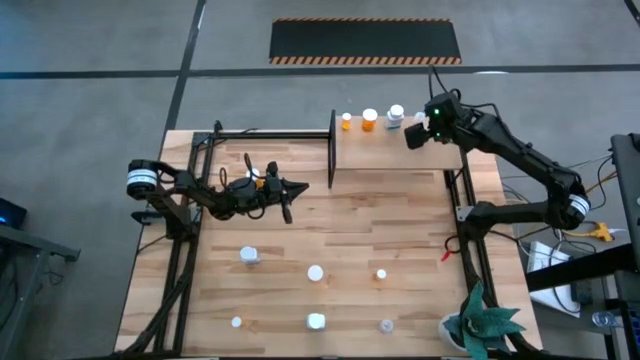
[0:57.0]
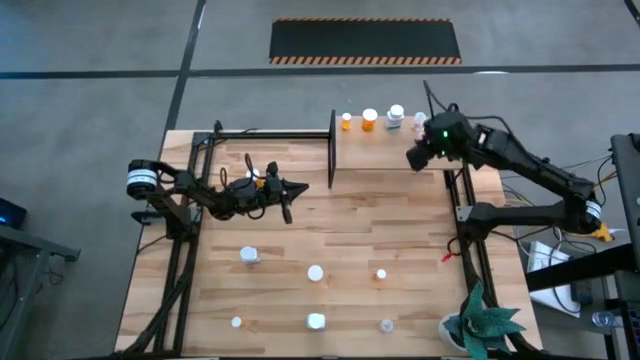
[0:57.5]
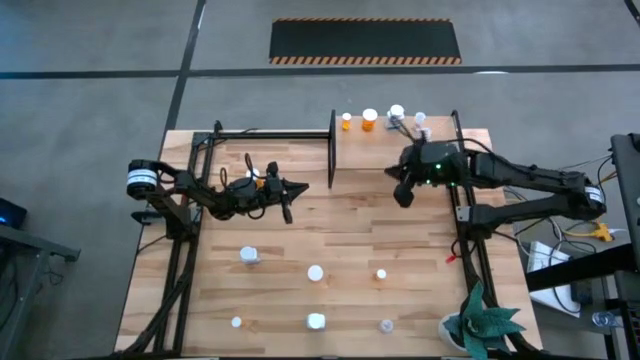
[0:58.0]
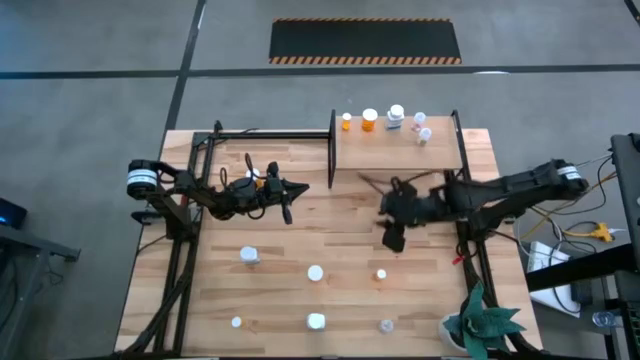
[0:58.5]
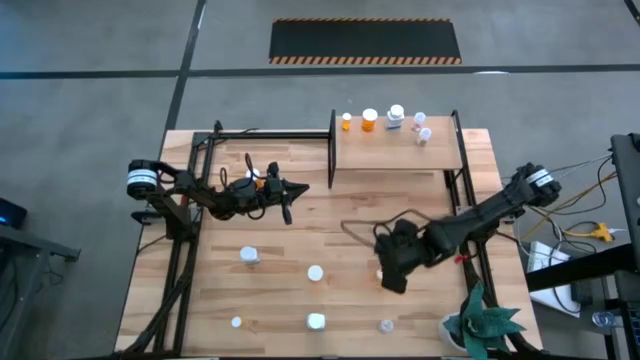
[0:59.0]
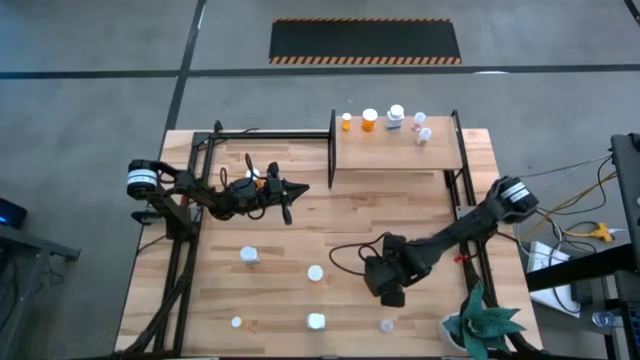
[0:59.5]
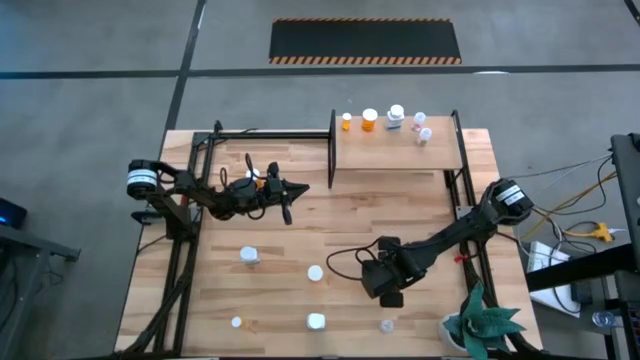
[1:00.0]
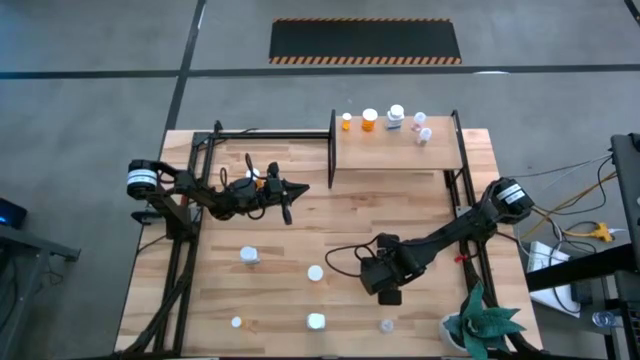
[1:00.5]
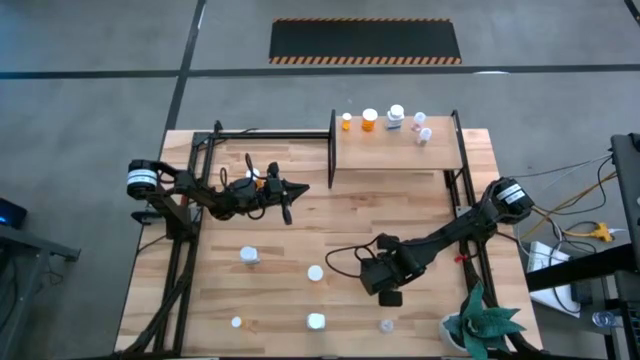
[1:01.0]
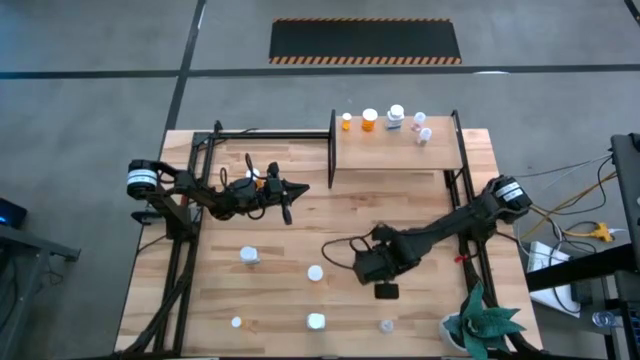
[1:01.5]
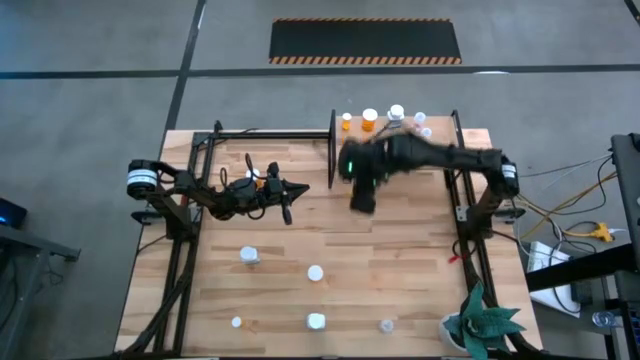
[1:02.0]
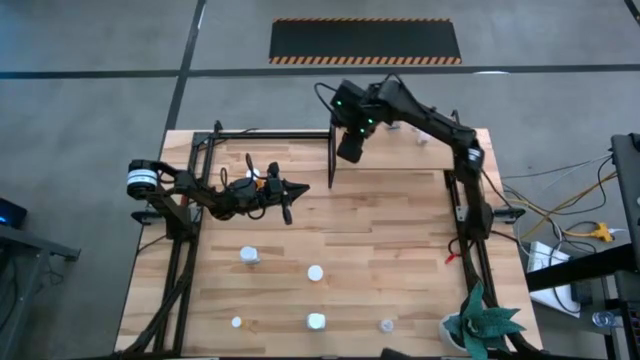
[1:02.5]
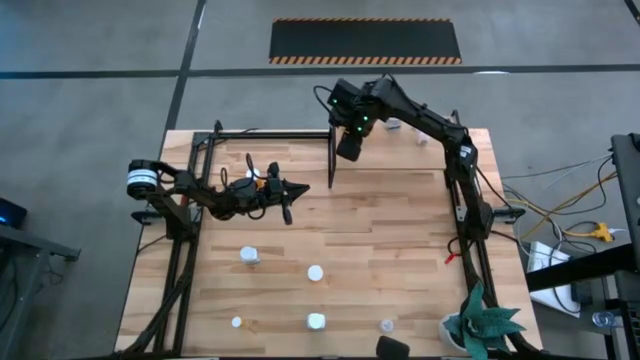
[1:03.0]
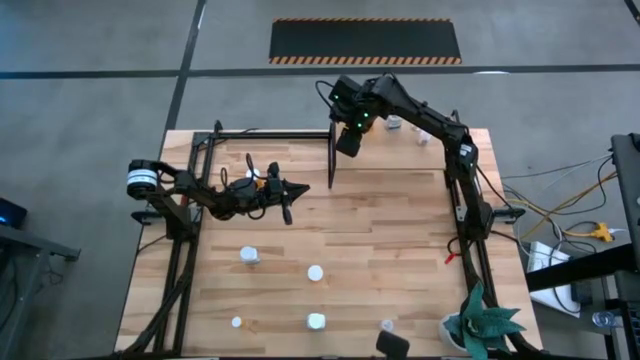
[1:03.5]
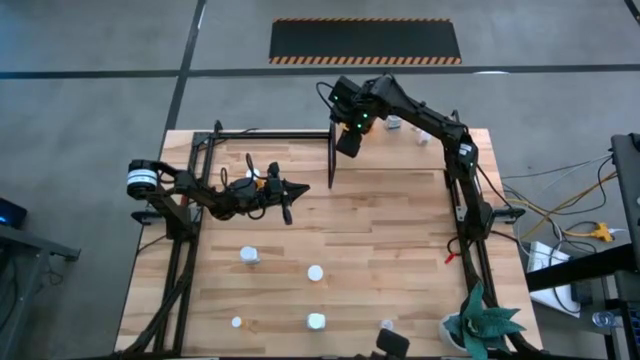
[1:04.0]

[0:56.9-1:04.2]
Task: Pick and place medicine bottles onto shelf by color
Put the top small orange pill bottle on the shelf aligned with the other small orange pill bottle

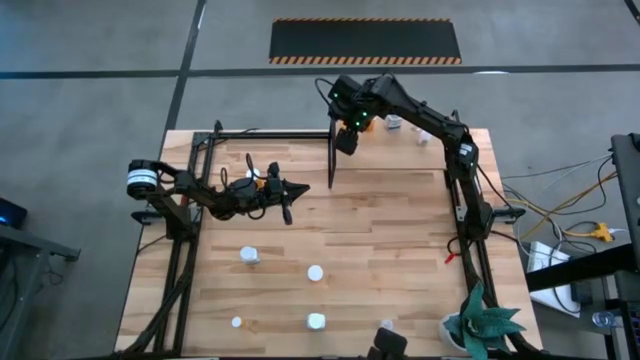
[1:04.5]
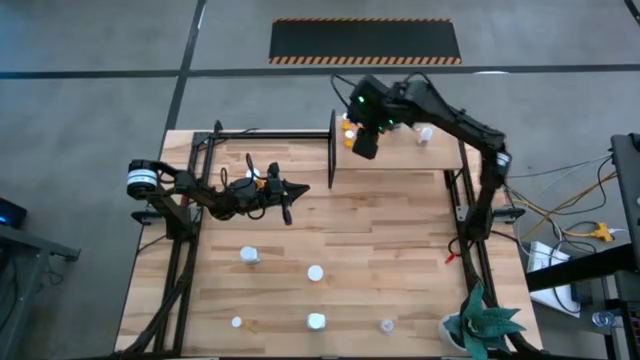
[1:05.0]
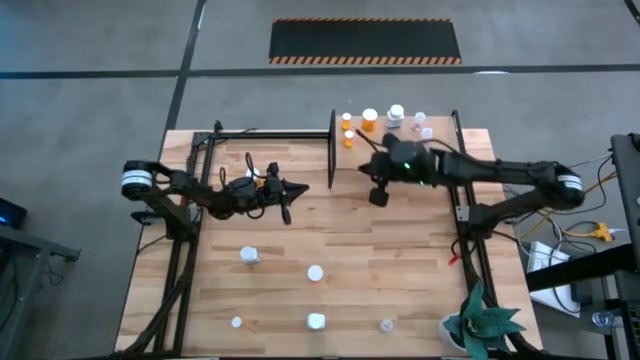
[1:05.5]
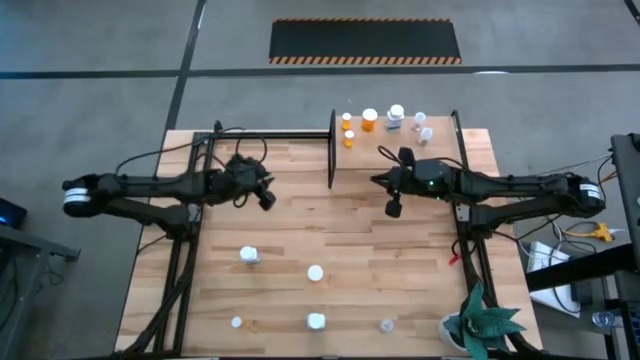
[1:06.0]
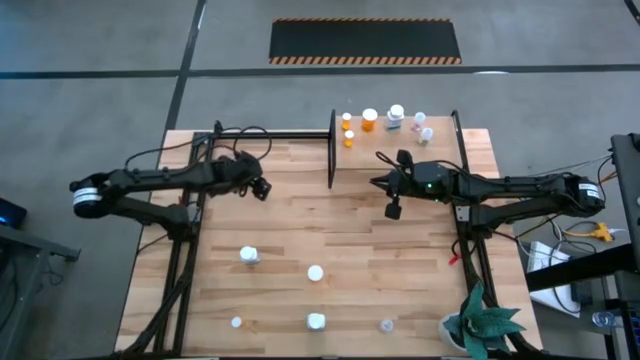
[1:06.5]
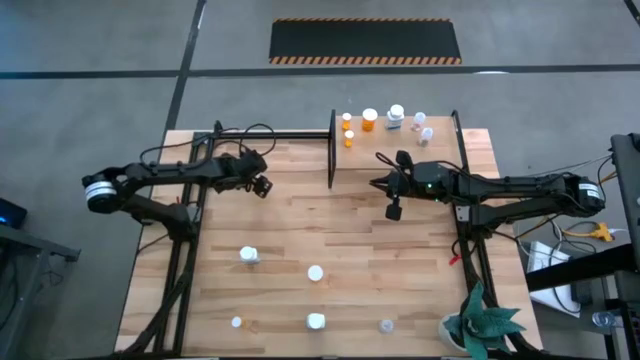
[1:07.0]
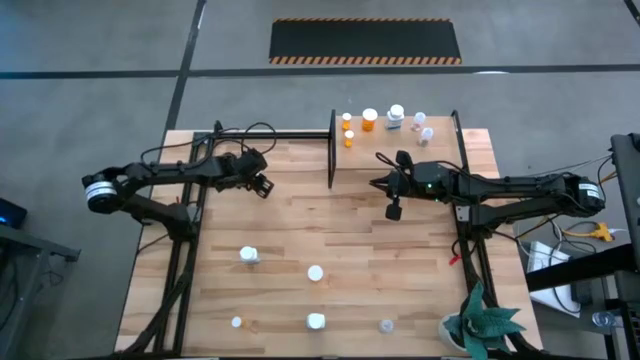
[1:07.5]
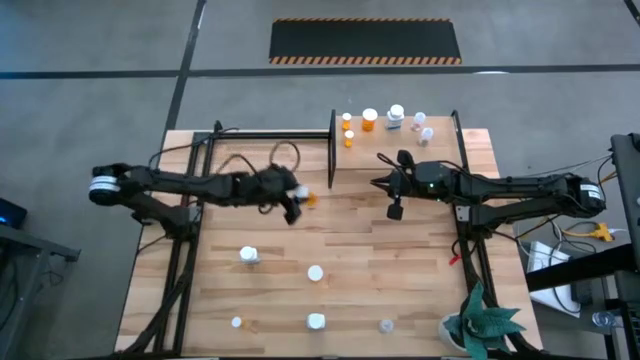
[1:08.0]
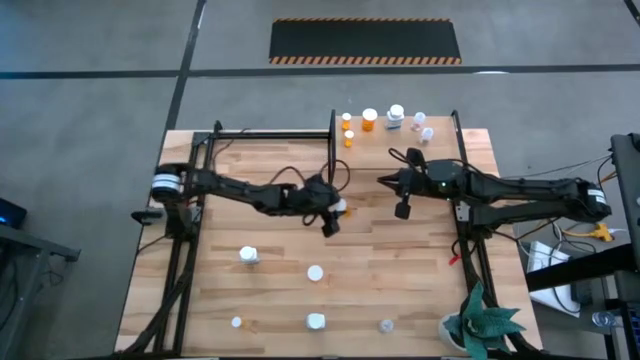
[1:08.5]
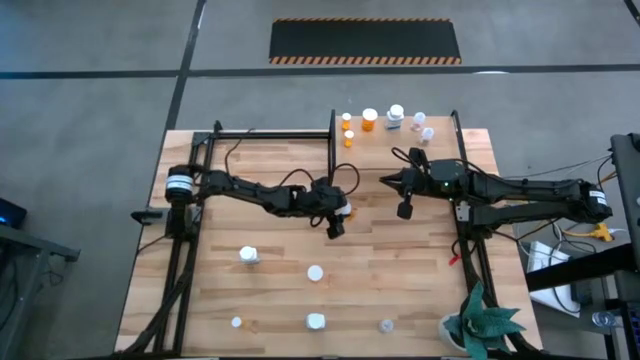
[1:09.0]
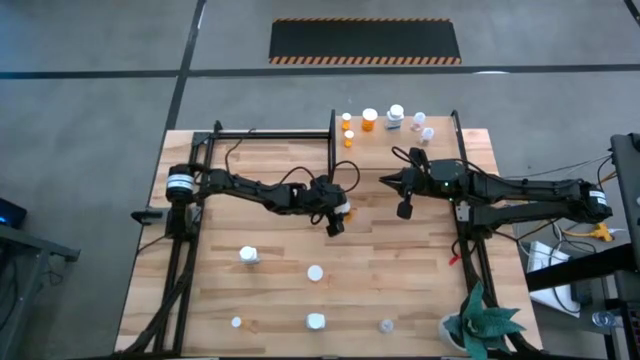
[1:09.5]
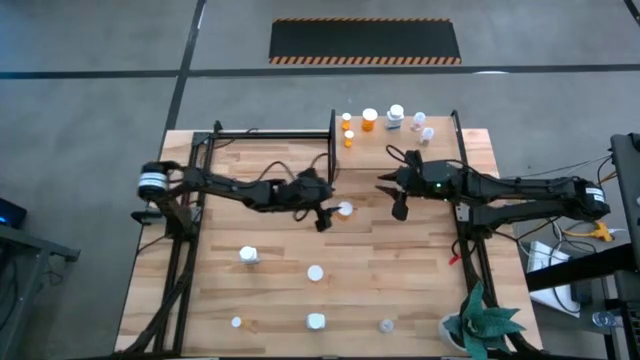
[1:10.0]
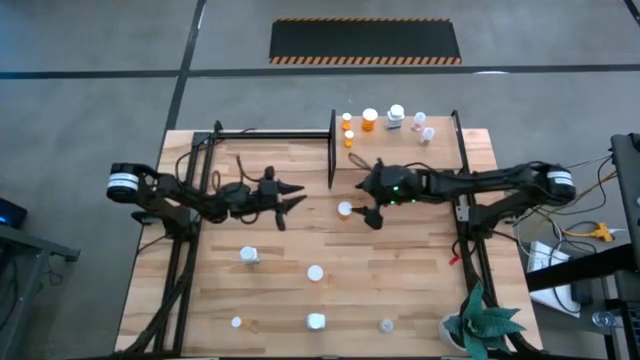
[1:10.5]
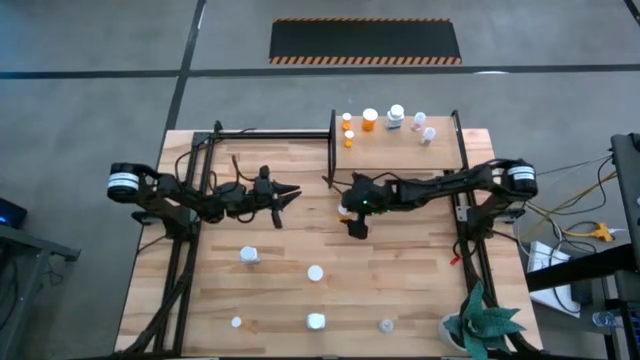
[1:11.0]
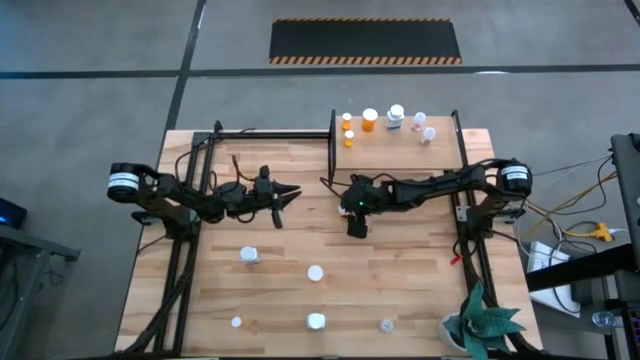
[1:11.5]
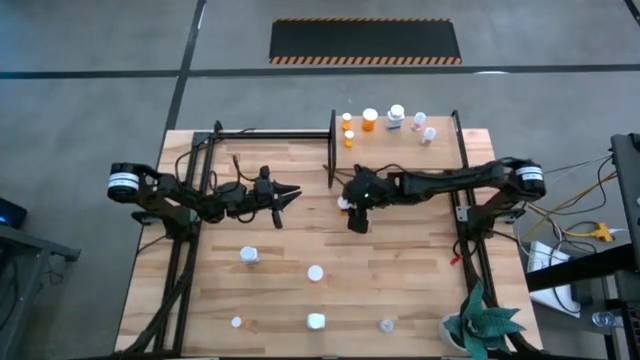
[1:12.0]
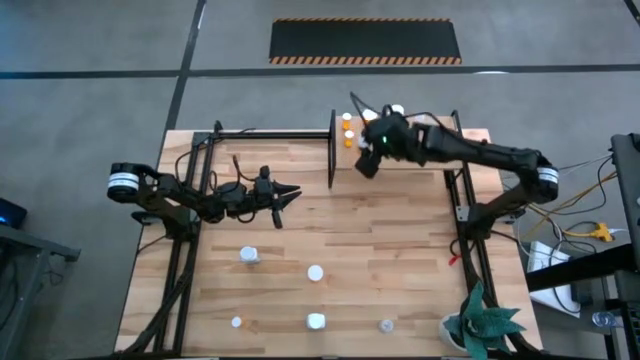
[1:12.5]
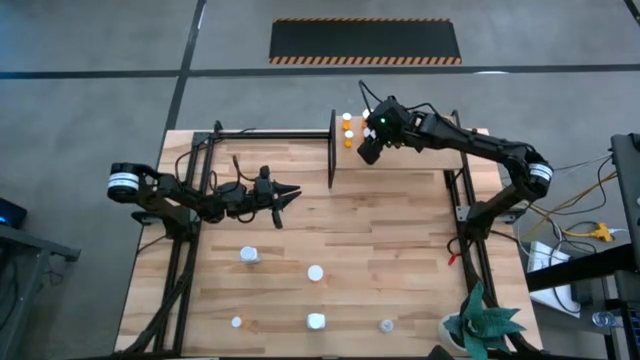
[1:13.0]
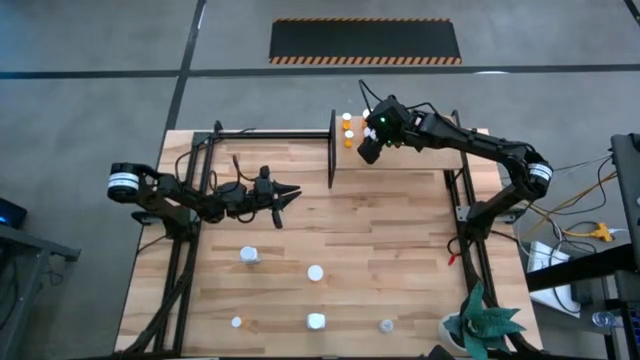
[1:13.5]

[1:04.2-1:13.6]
Put the top big orange pill bottle on the shelf aligned with the other big orange pill bottle

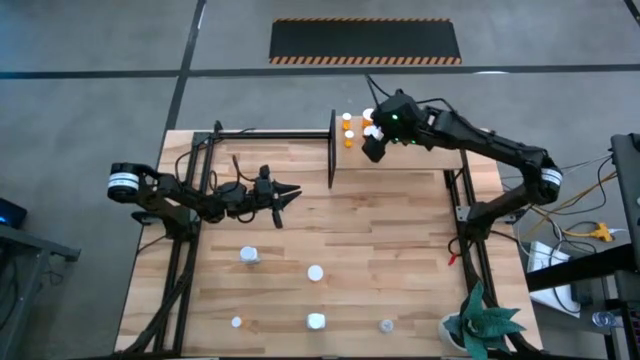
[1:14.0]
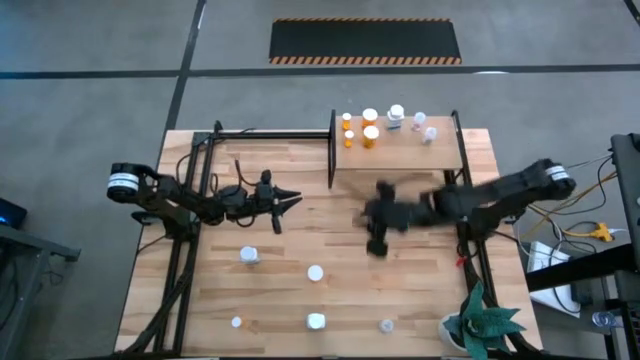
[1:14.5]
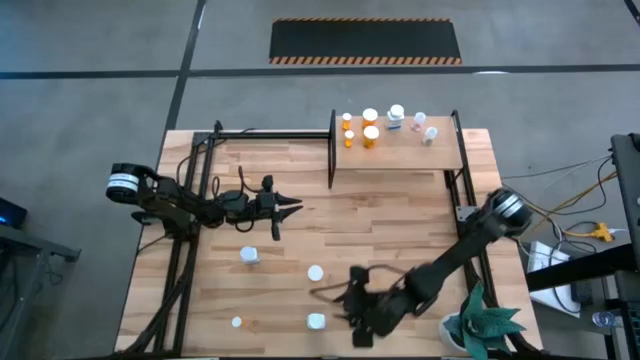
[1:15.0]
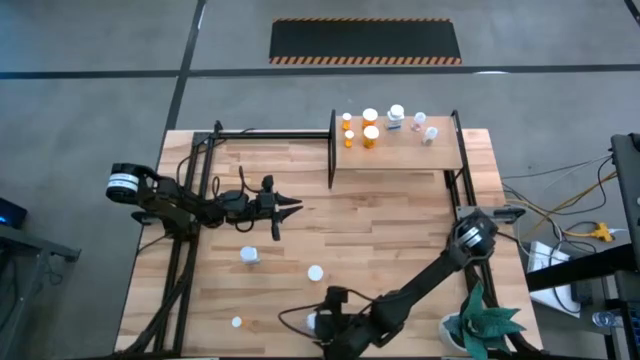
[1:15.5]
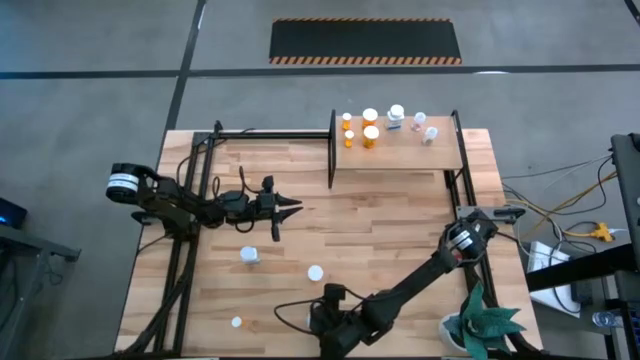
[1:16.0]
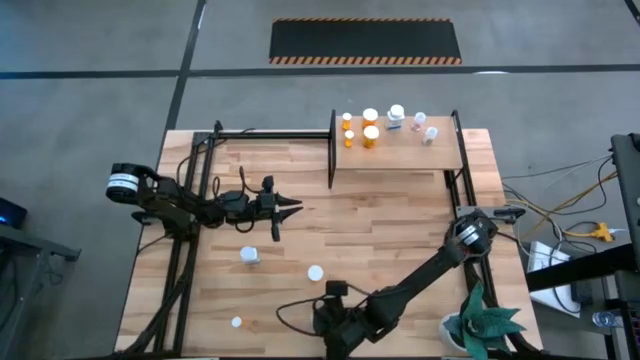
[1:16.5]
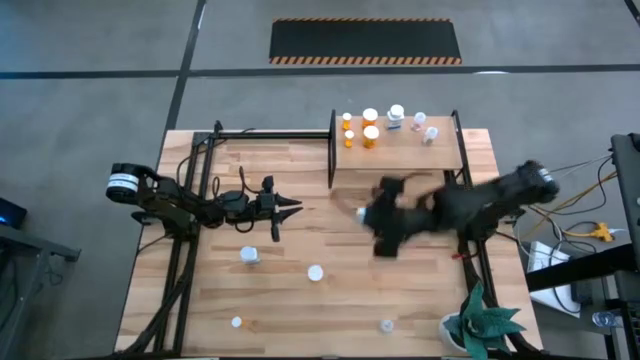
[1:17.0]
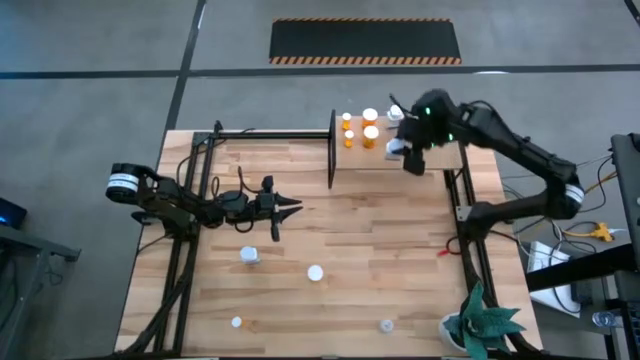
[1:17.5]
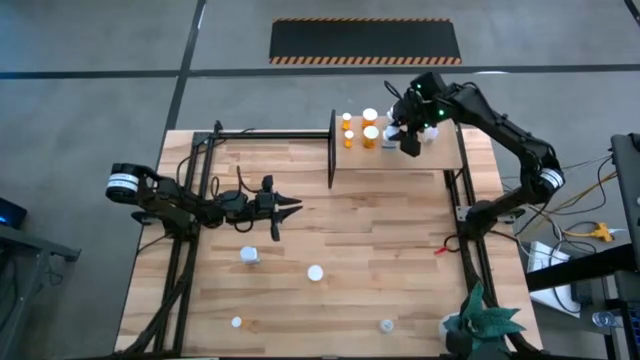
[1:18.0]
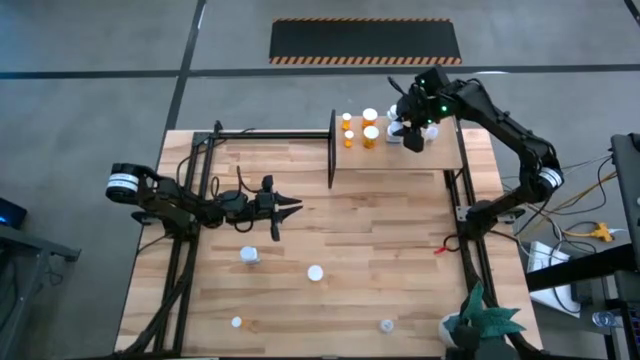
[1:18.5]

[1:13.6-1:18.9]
Put the bottom white pill bottle on the shelf aligned with the other white pill bottle
